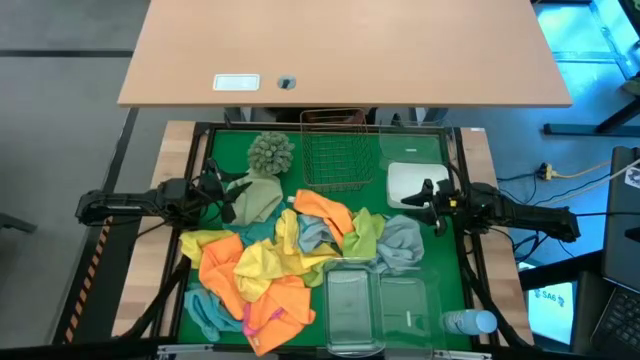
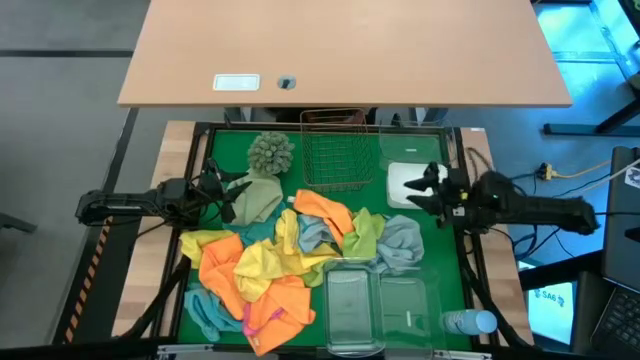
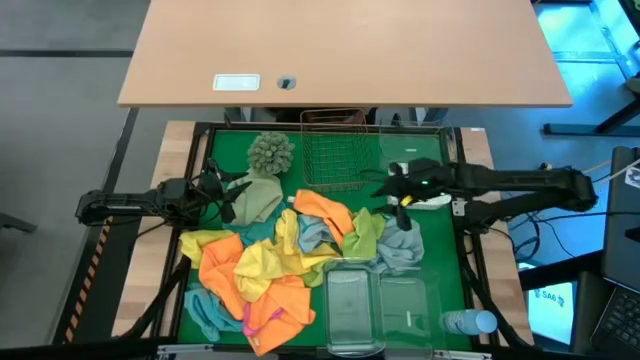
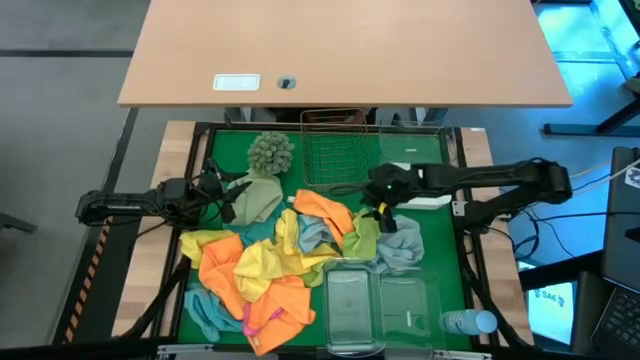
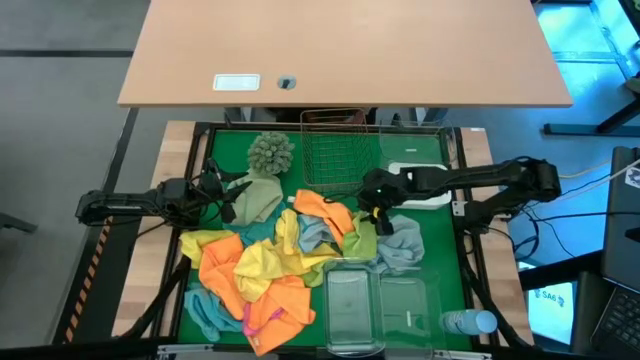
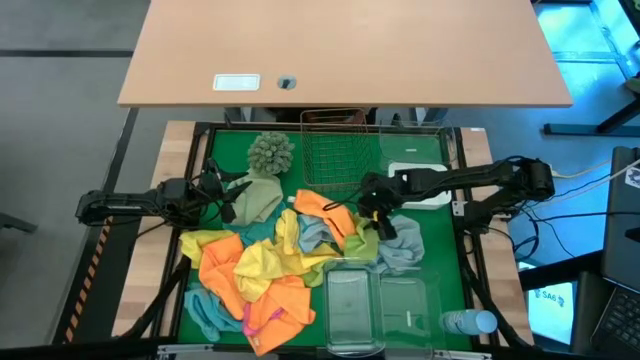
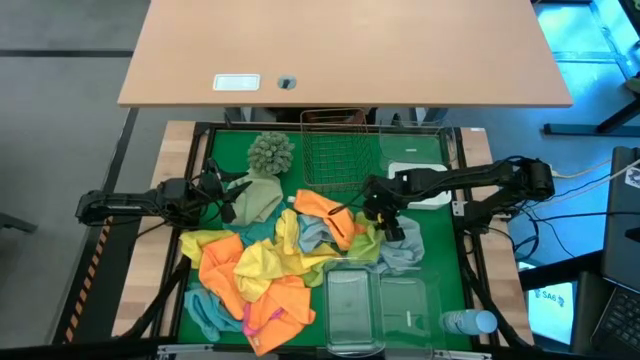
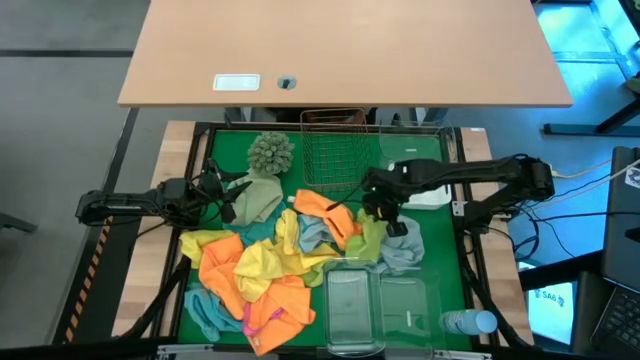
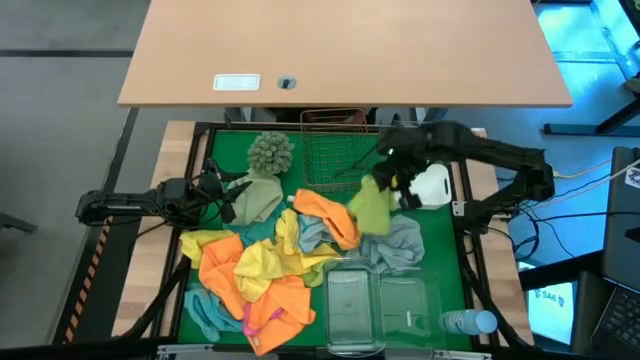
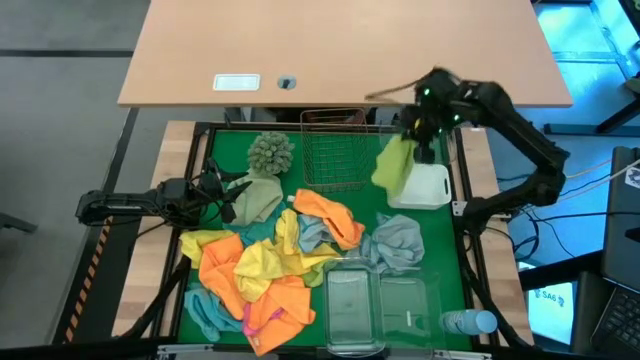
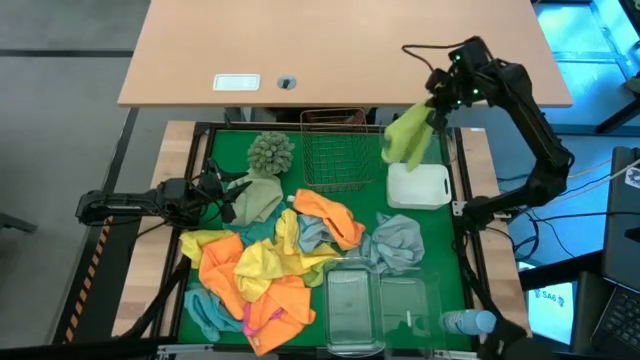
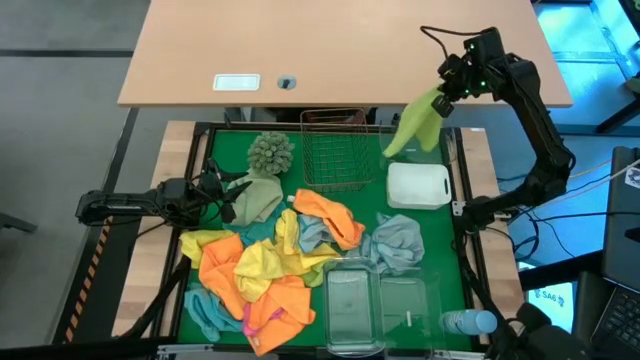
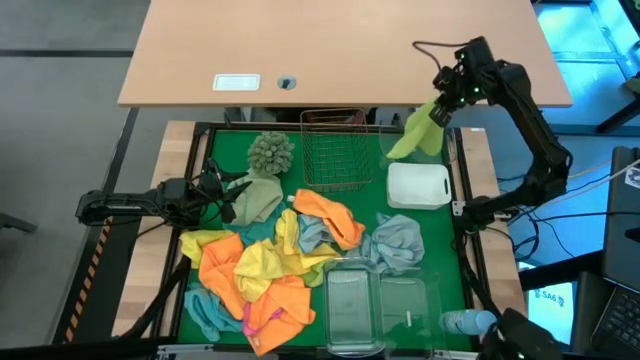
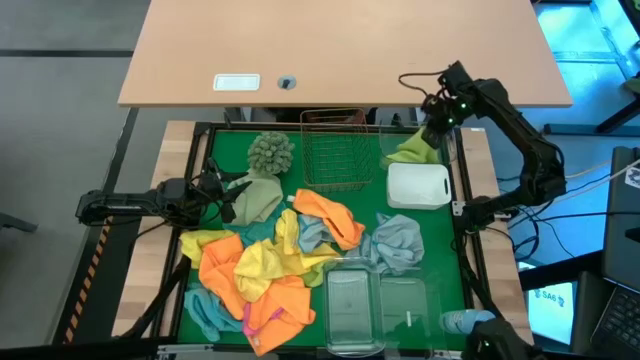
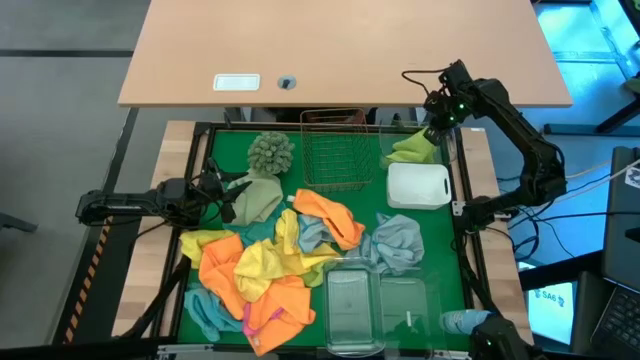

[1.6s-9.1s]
Task: Sort microfiber towel by color & place in baskets
Put the green microfiber towel into the top transparent bin

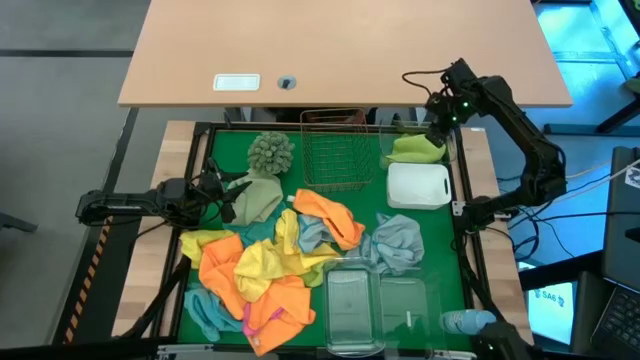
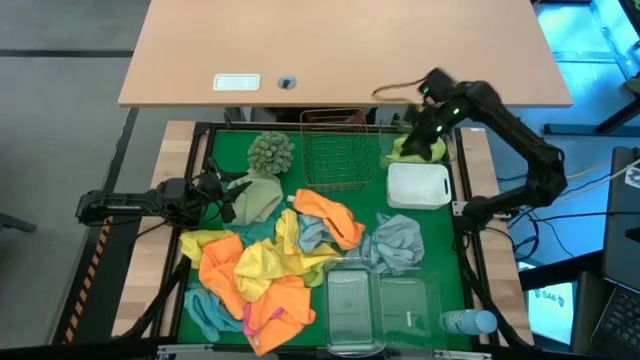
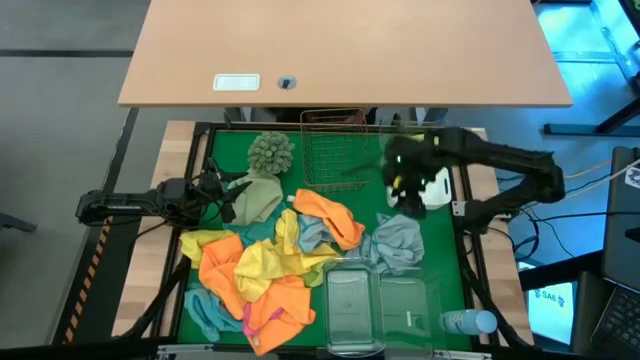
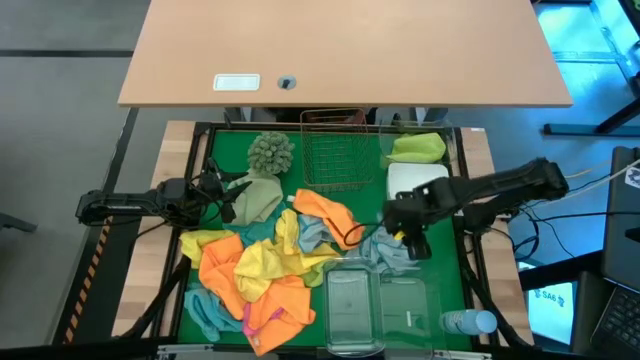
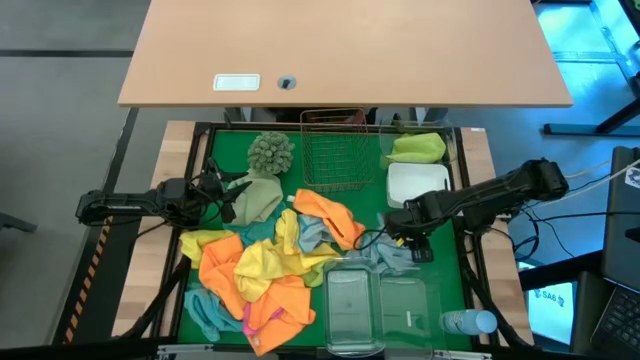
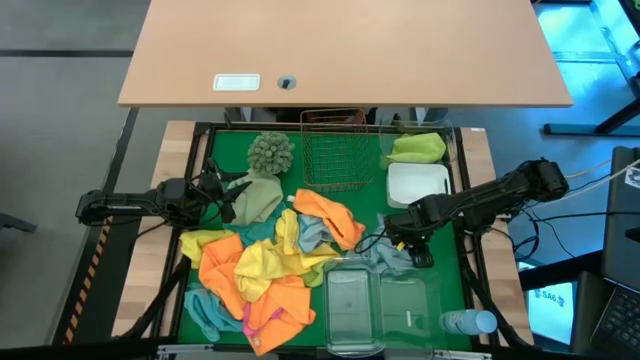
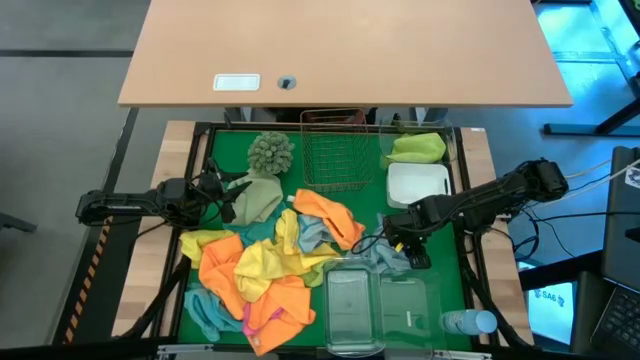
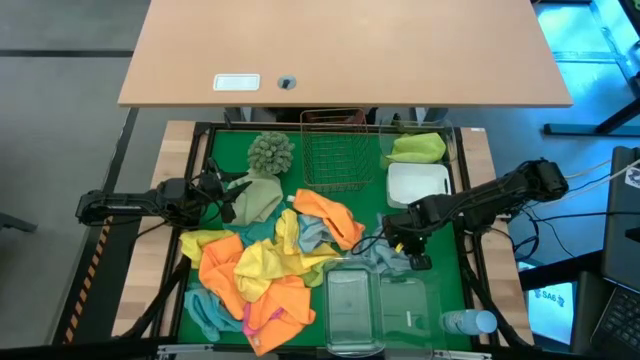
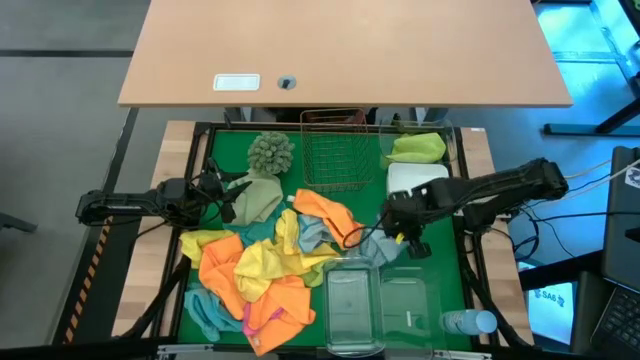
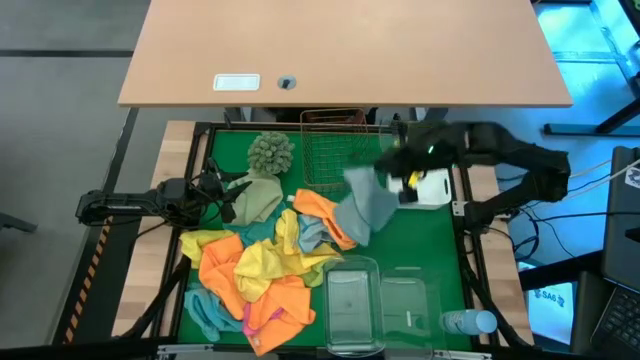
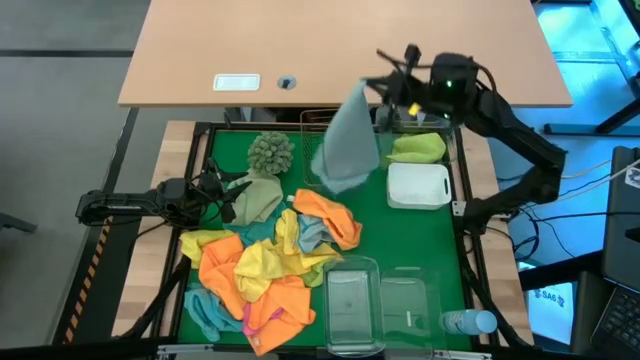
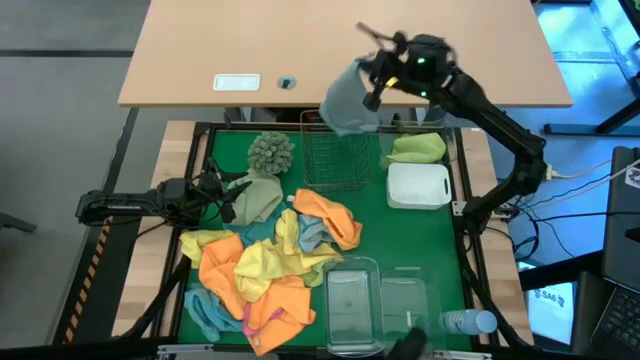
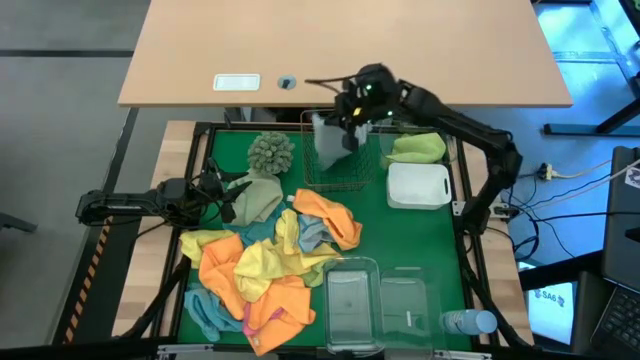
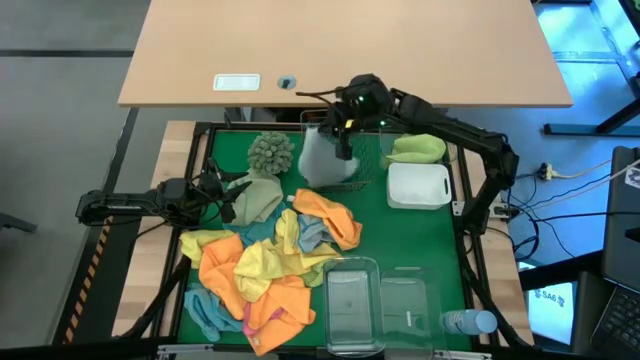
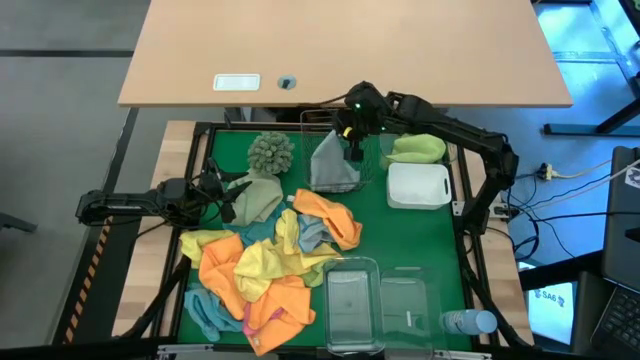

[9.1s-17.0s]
Put the blue microfiber towel into the wire basket

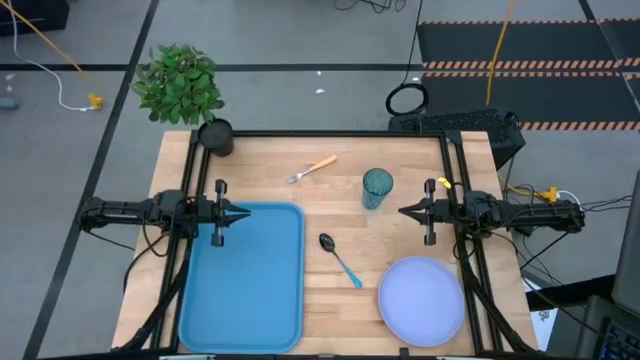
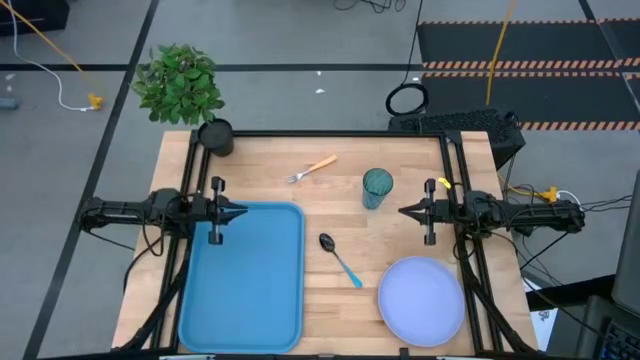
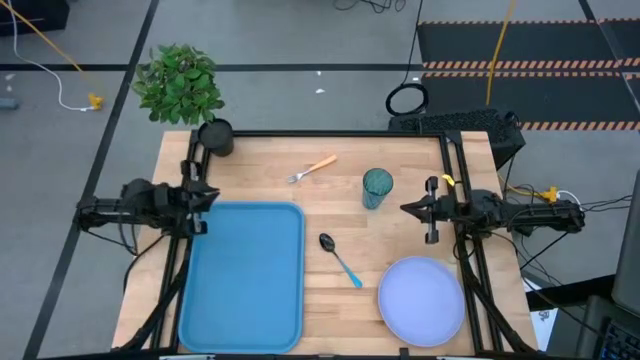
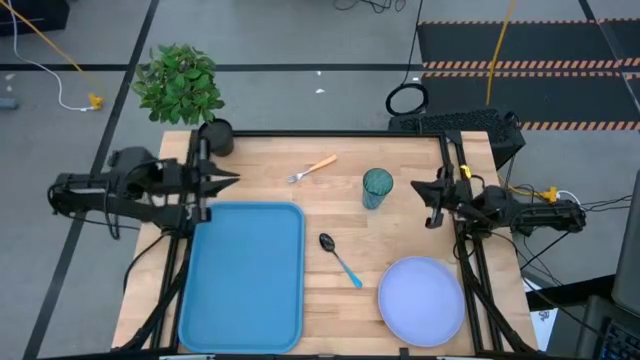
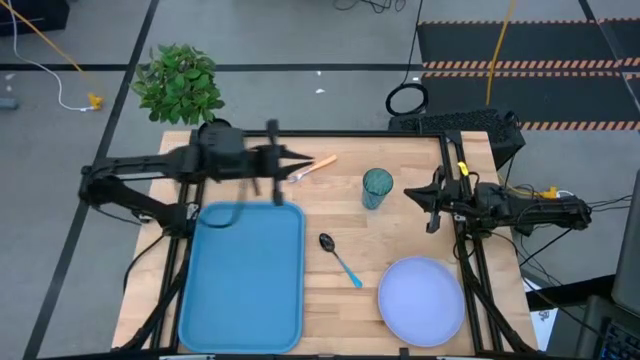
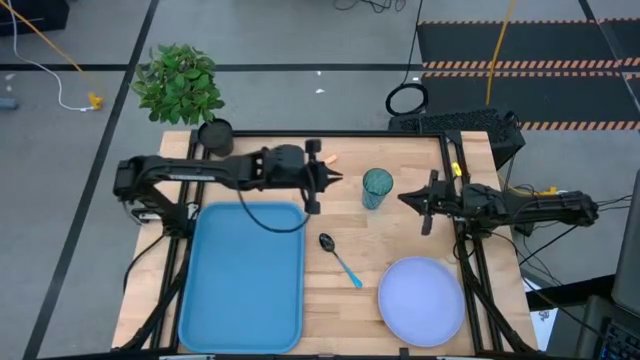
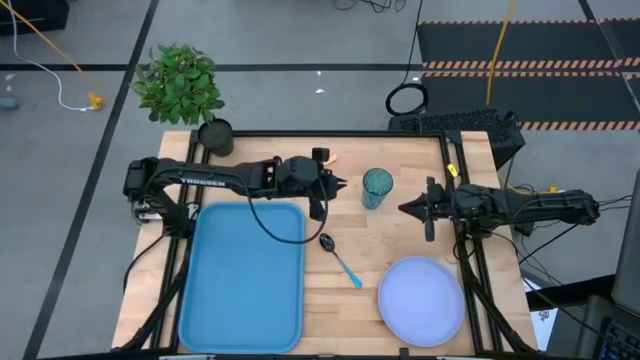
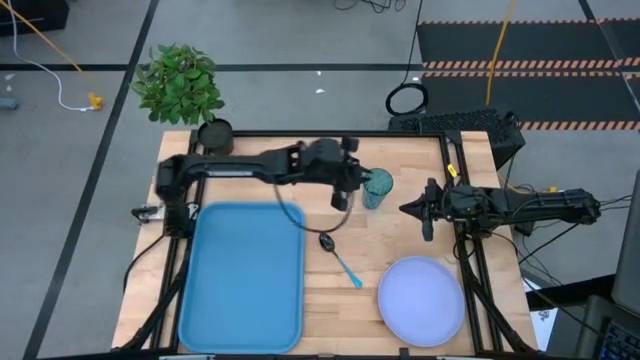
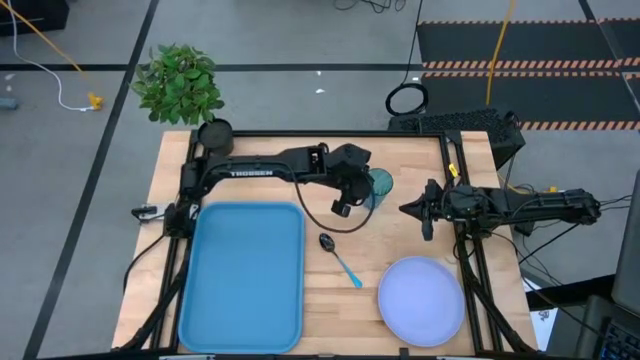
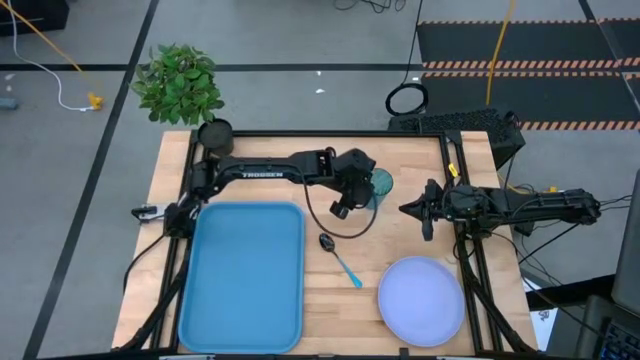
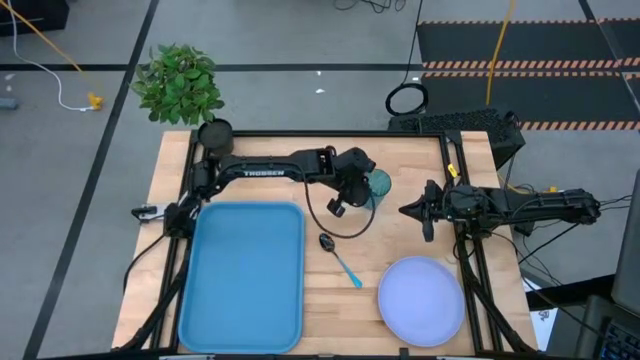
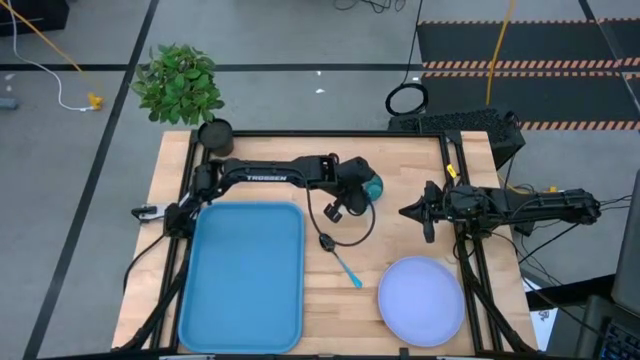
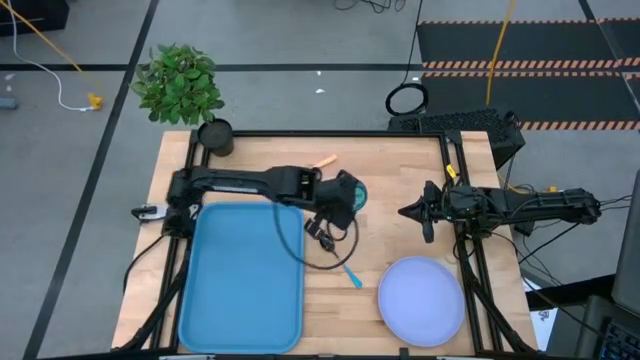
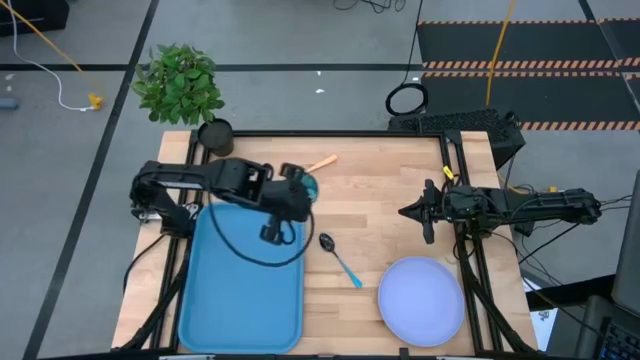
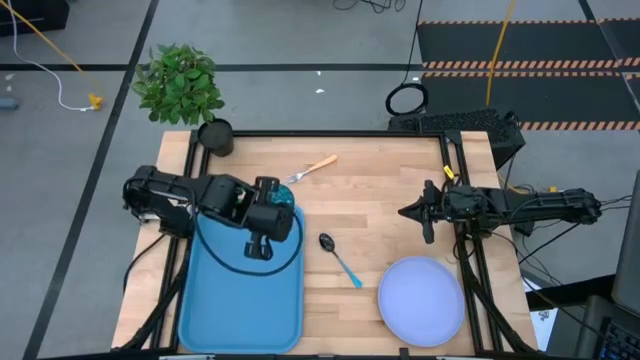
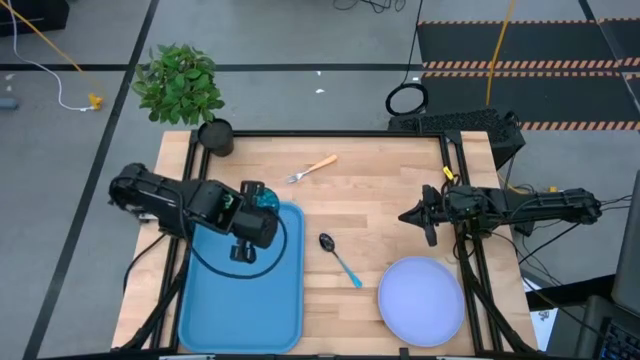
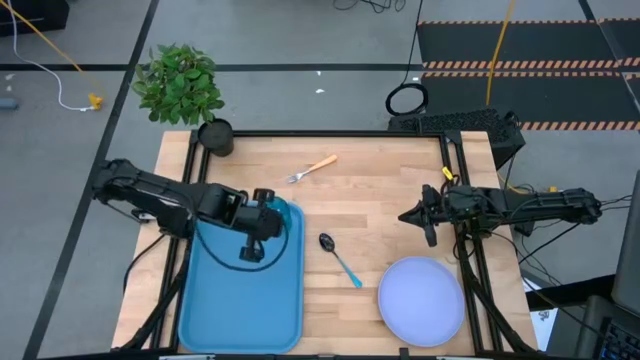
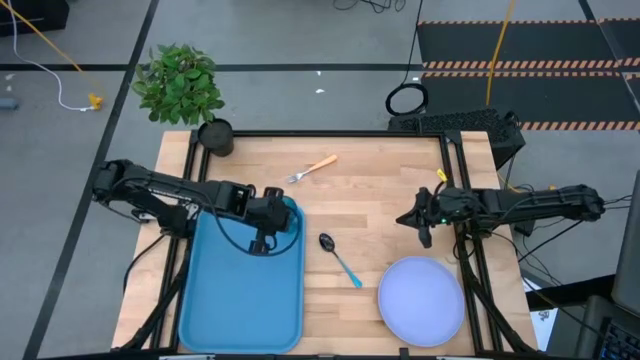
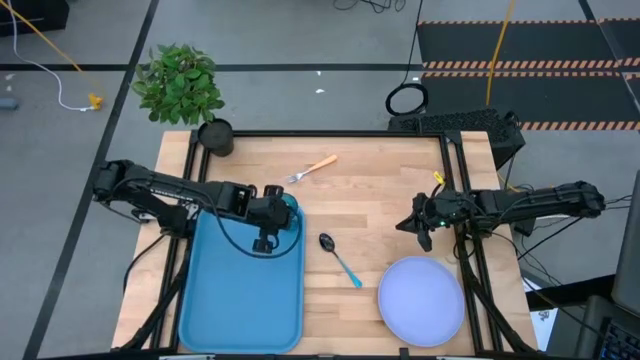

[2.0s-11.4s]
Task: Pick and place plate/cup/fork/spoon on tray
Put the blue cup on the blue tray
